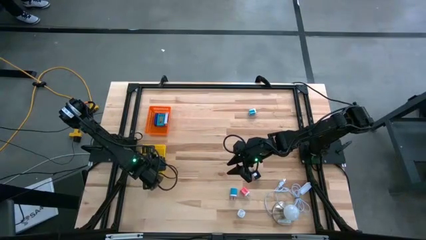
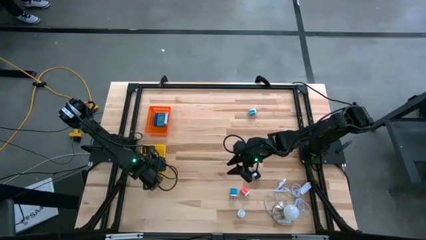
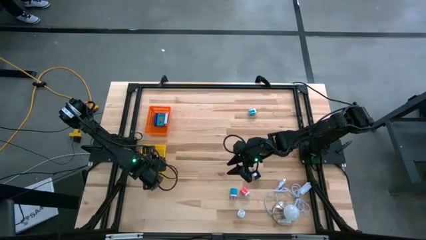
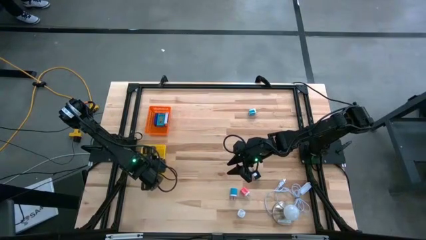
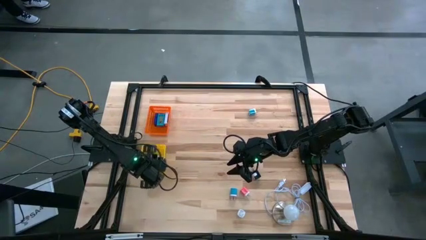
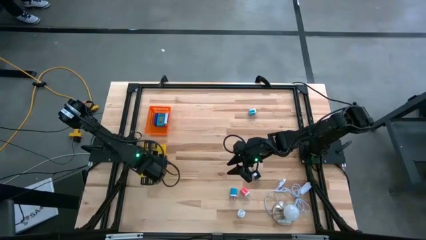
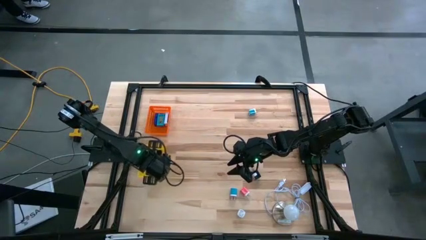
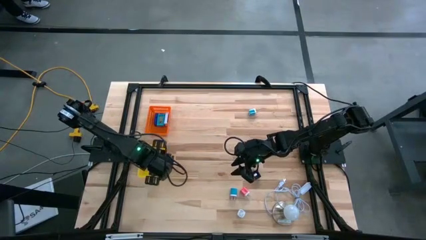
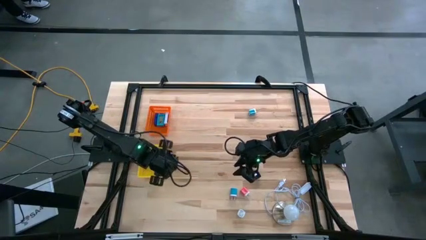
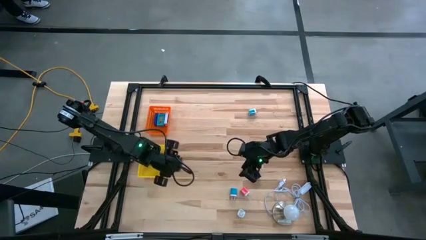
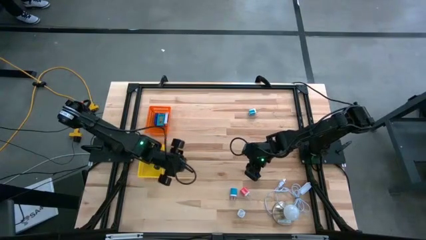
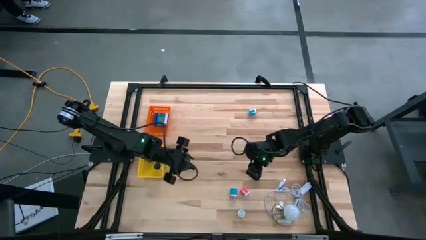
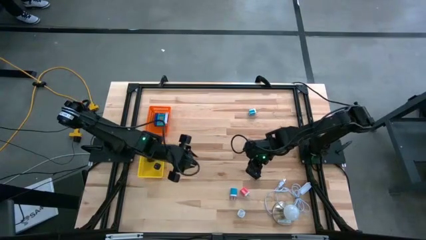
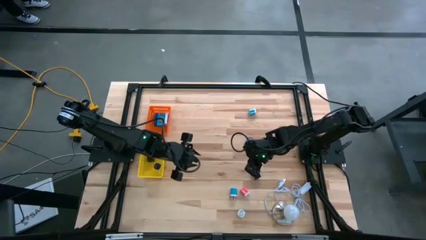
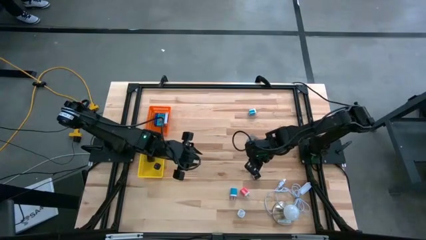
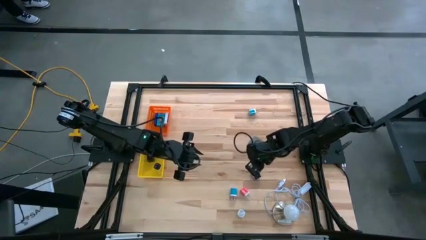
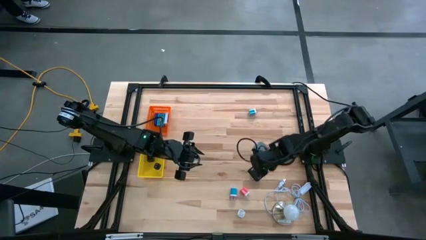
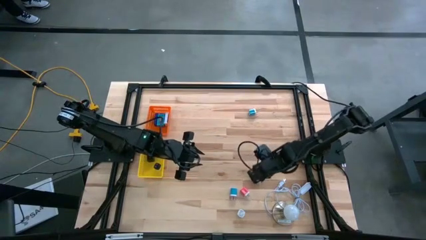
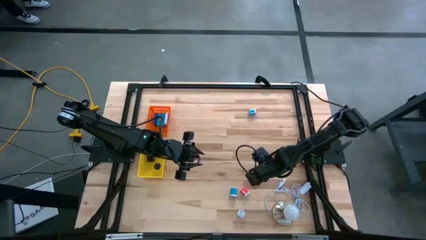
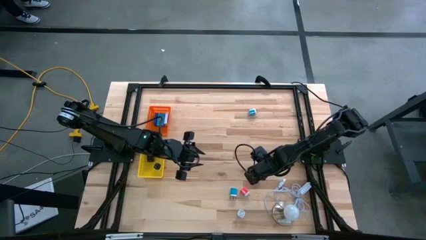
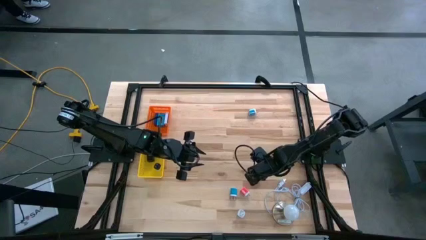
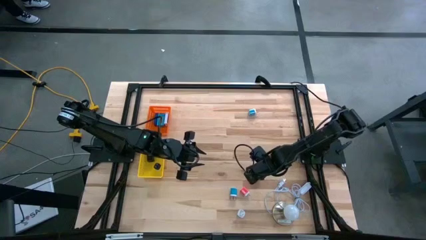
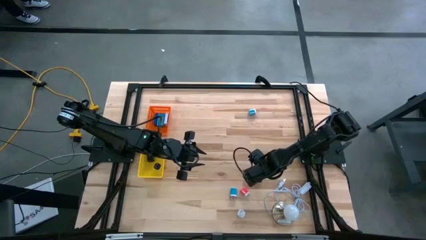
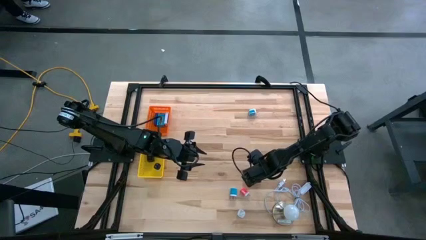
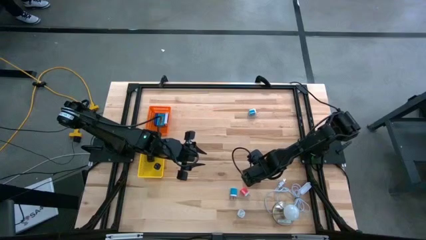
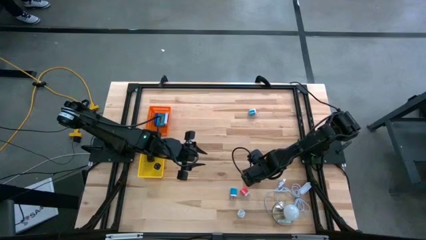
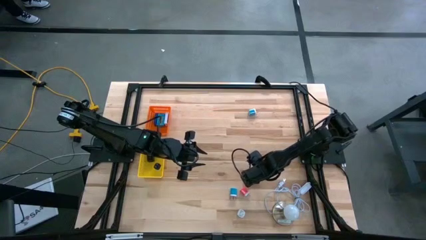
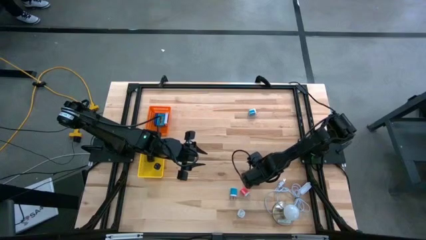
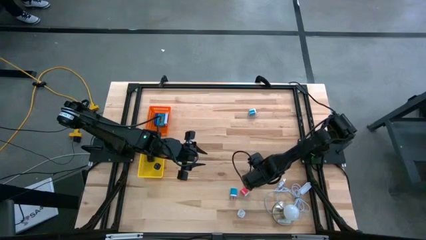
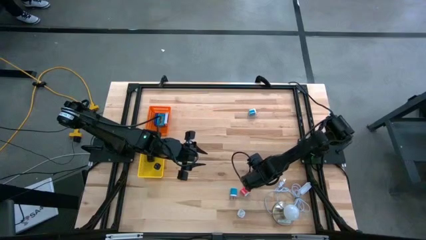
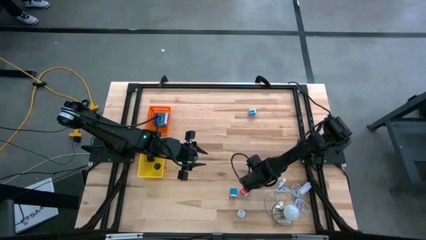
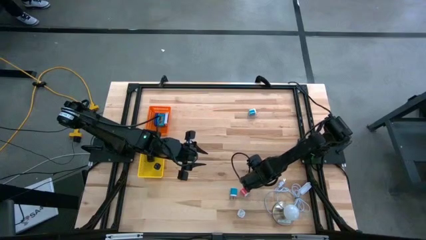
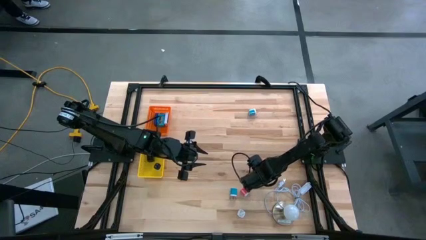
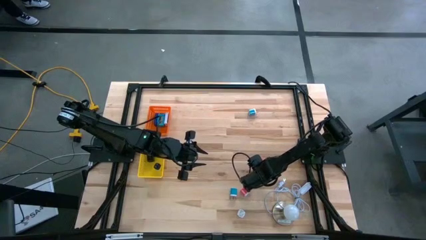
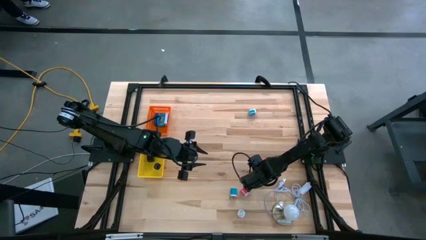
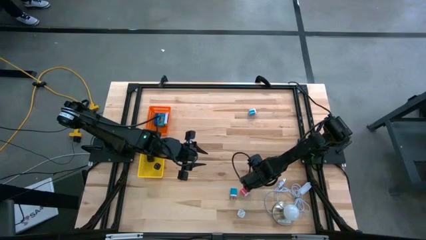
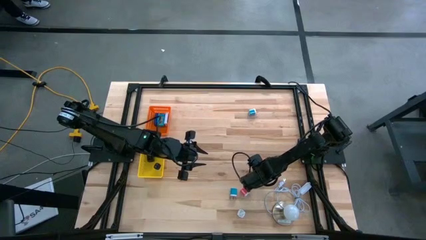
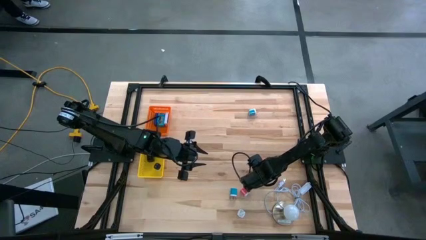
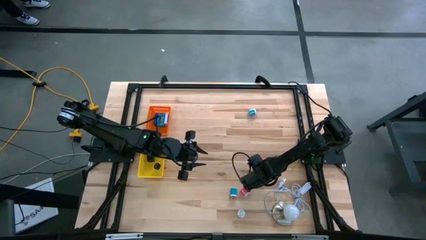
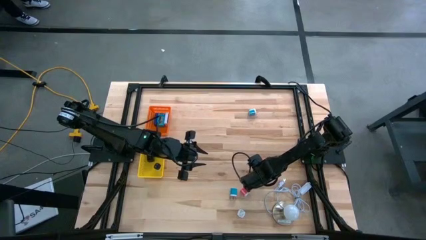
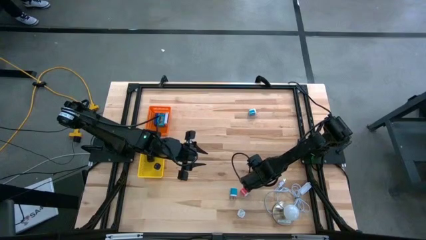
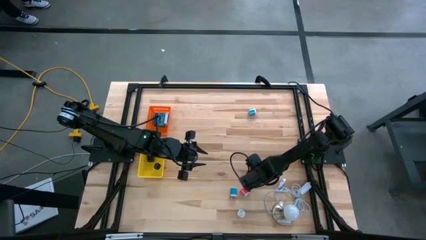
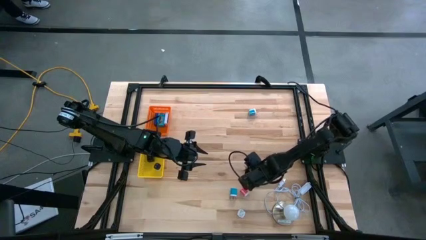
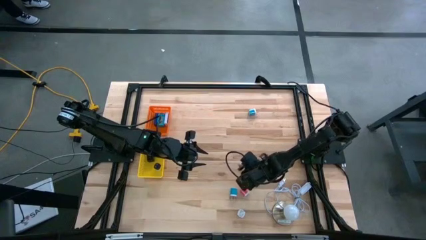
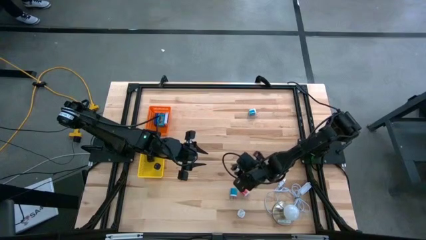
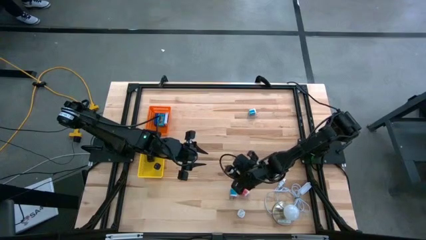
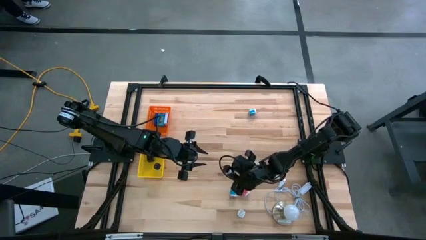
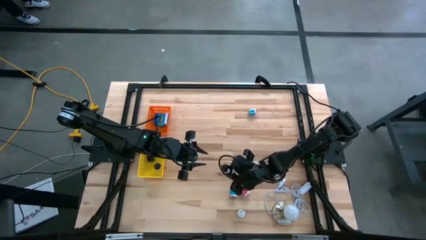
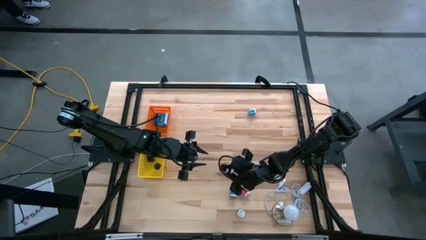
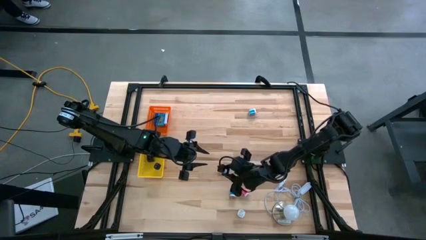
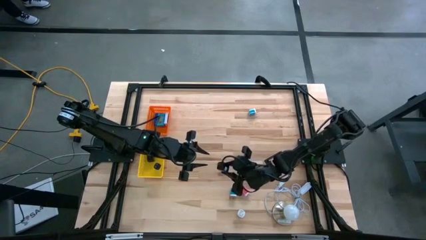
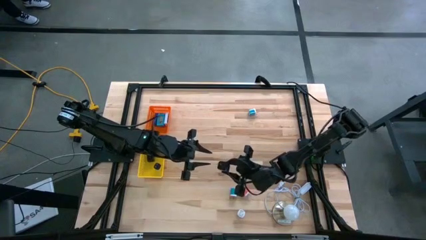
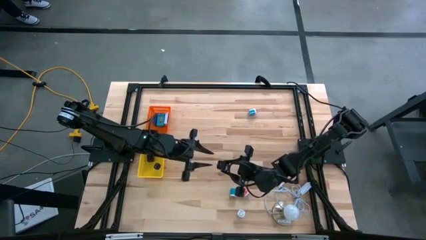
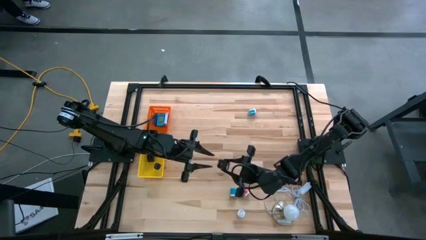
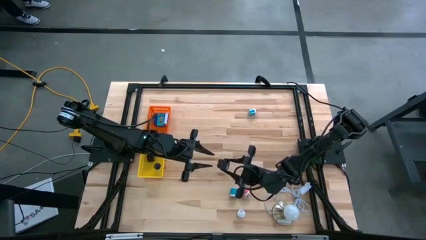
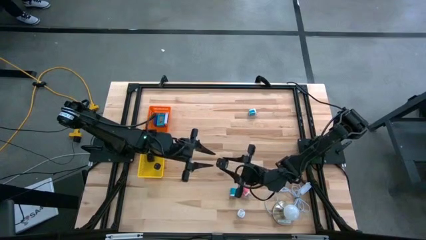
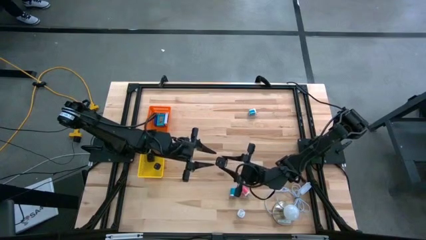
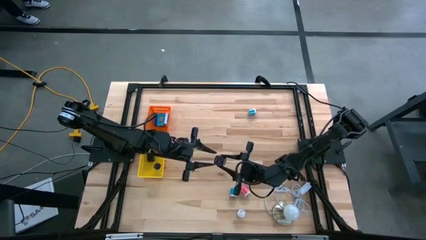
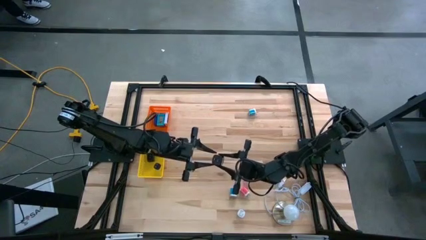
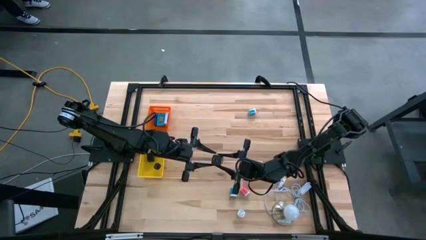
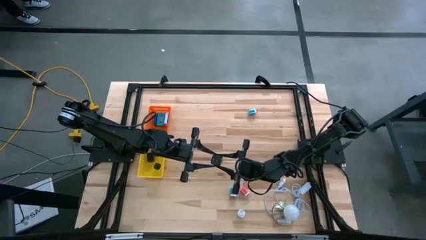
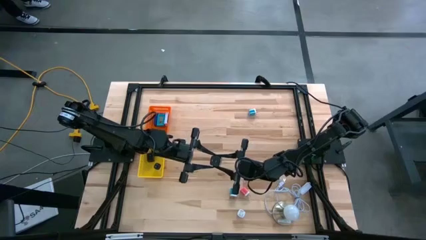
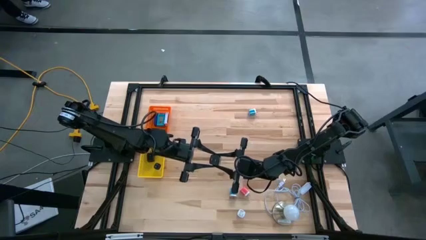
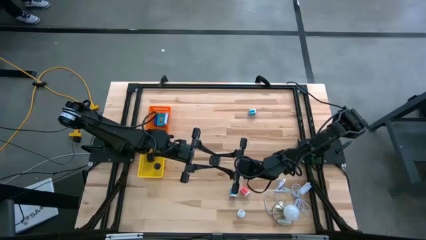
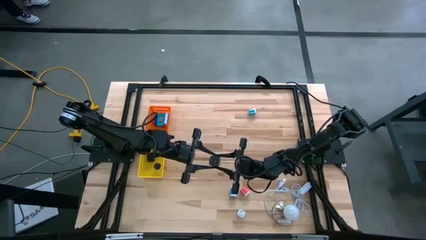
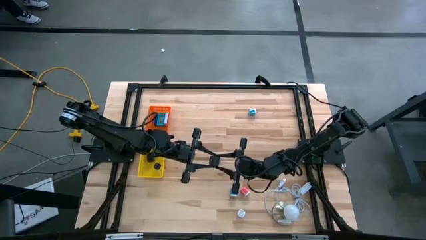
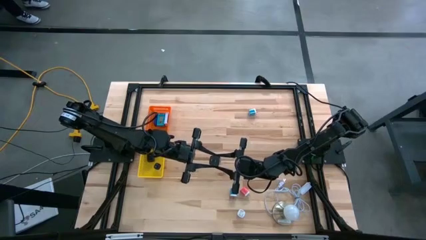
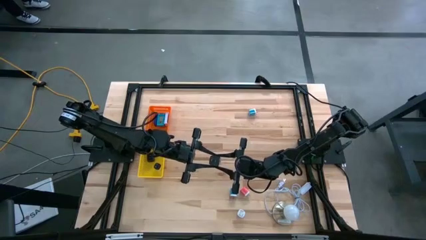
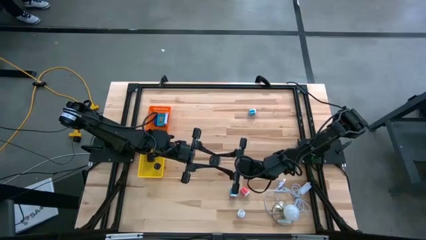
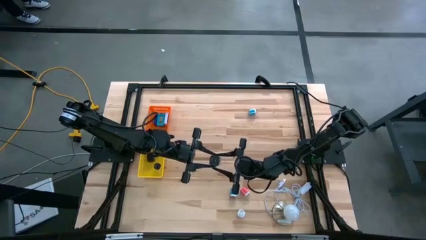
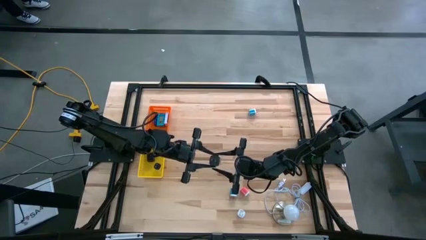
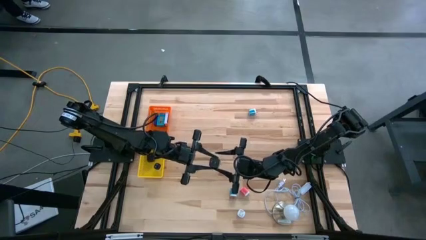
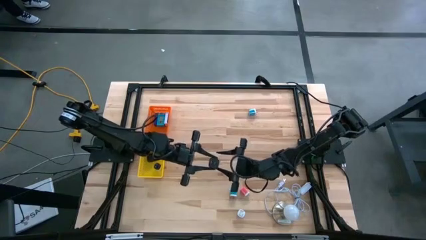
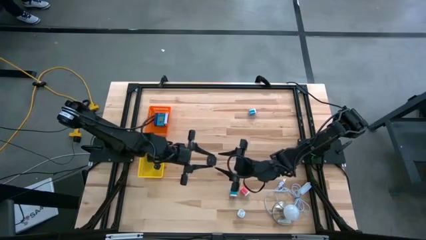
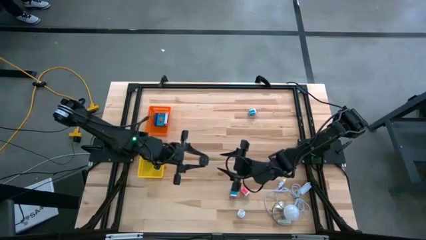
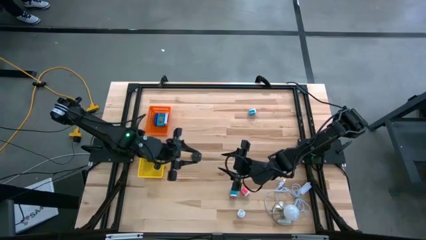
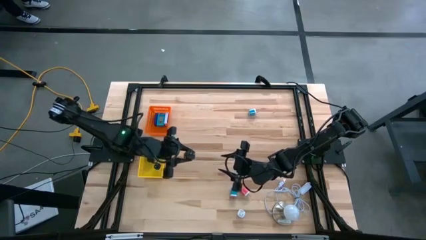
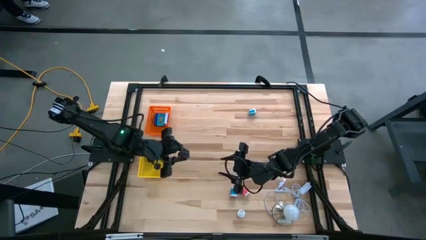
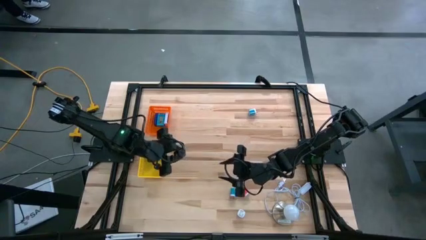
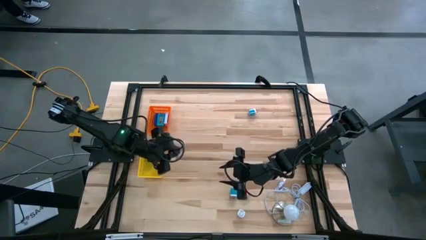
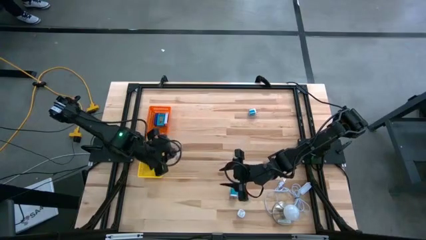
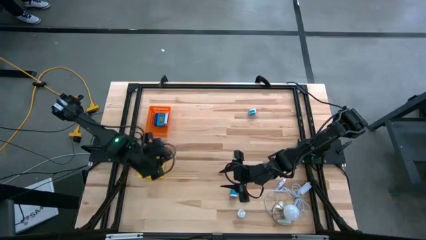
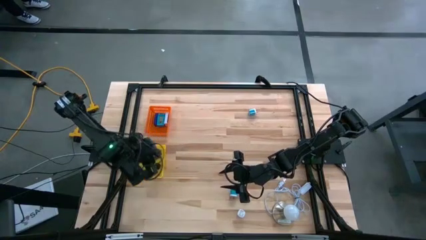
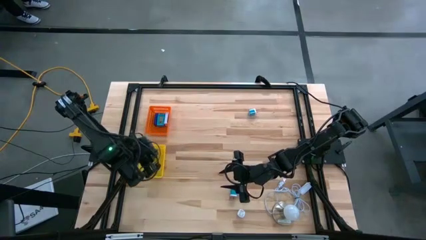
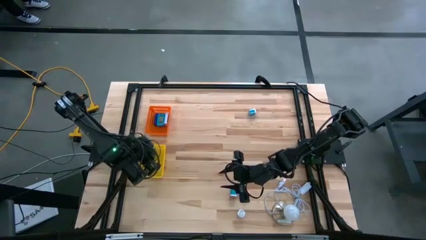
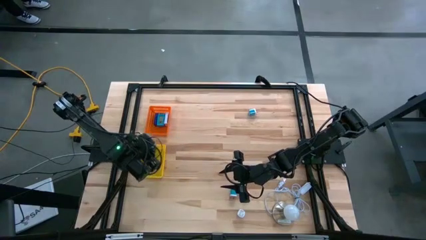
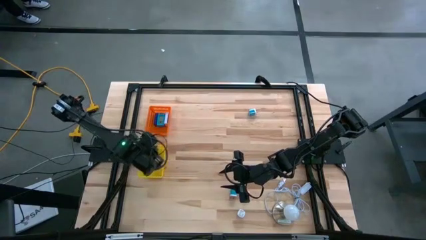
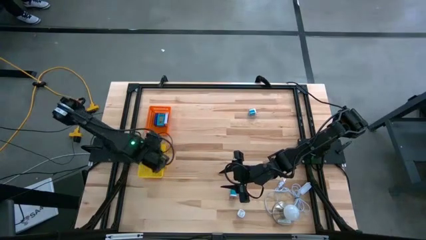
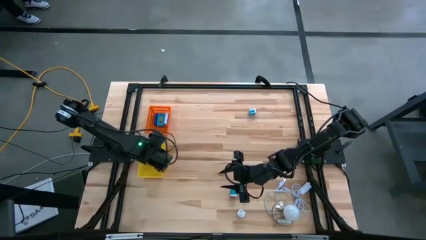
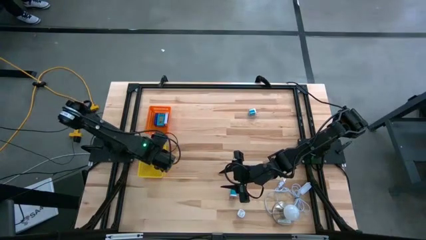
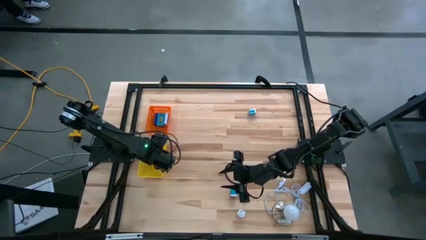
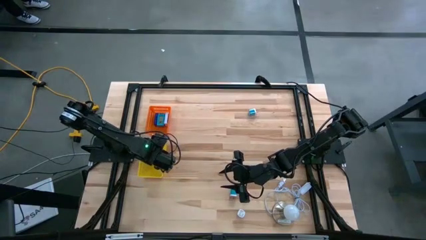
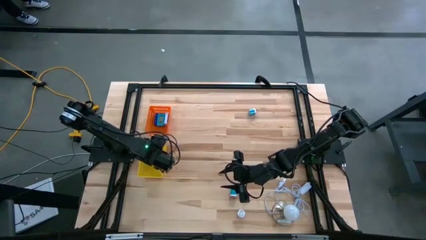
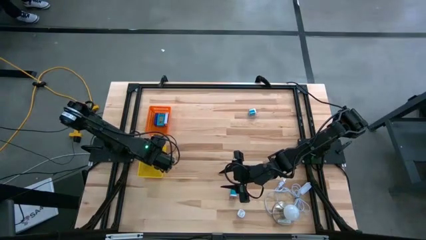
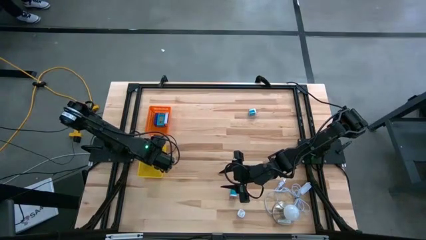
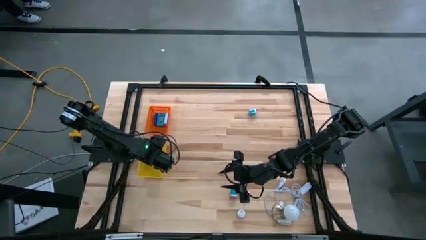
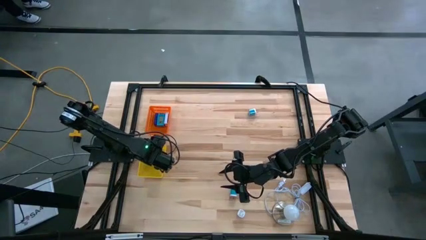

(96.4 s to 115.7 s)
Task: Pick & Place Office items
Put the black charger adapter into the yellow basket
